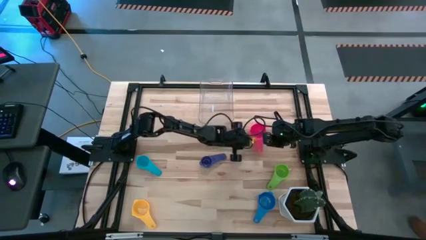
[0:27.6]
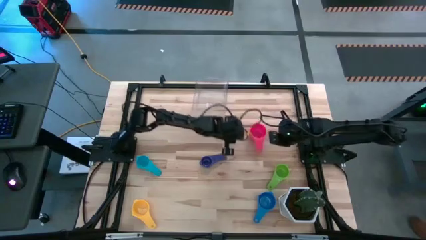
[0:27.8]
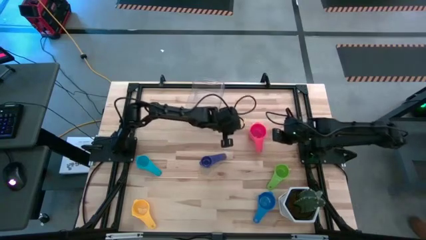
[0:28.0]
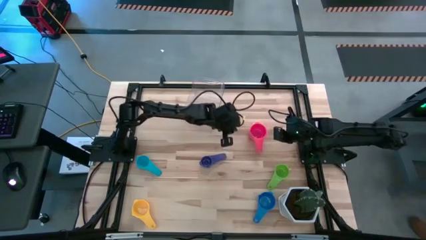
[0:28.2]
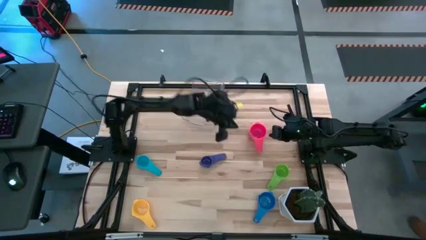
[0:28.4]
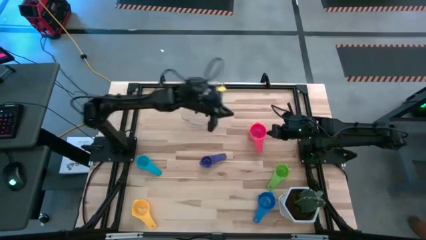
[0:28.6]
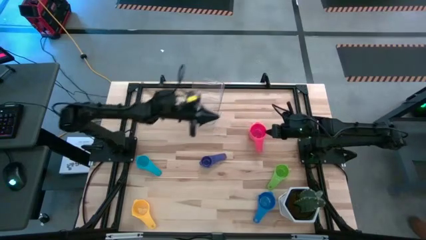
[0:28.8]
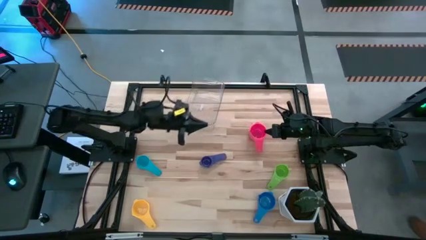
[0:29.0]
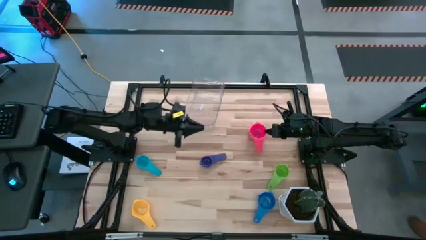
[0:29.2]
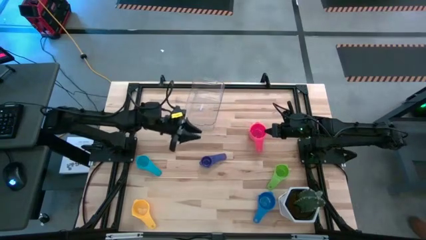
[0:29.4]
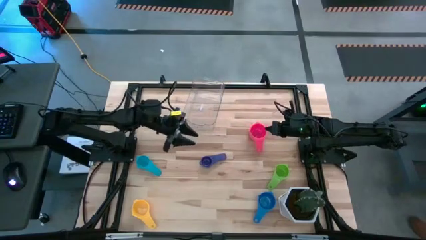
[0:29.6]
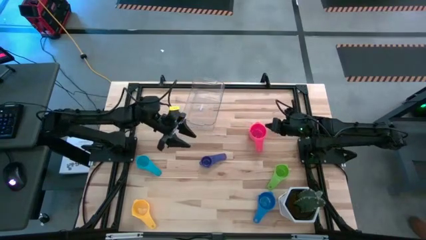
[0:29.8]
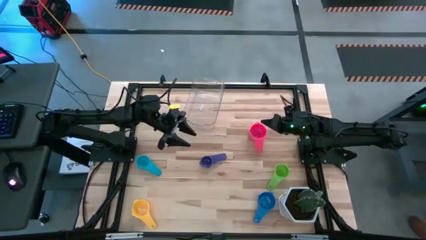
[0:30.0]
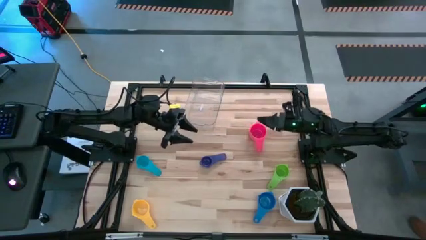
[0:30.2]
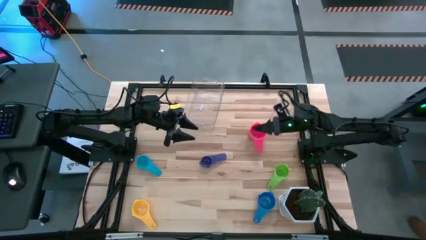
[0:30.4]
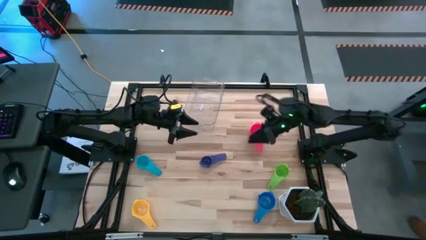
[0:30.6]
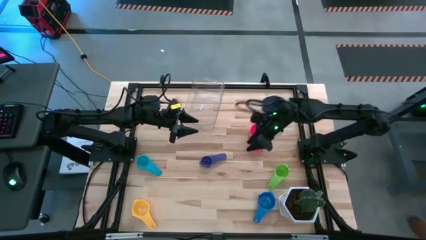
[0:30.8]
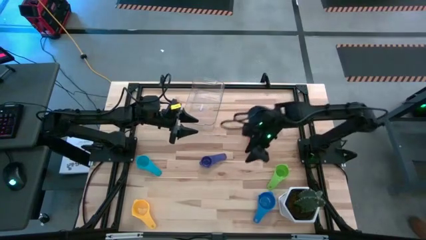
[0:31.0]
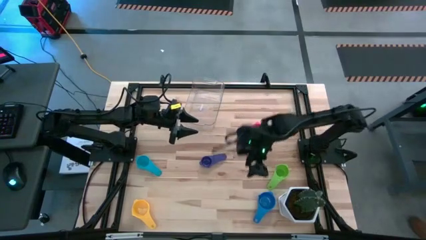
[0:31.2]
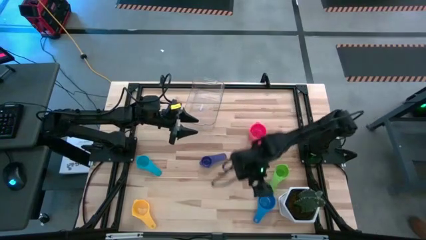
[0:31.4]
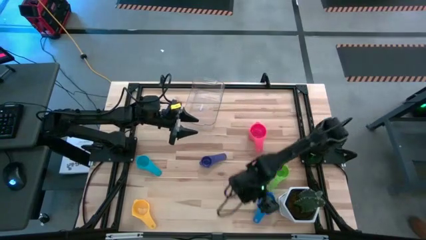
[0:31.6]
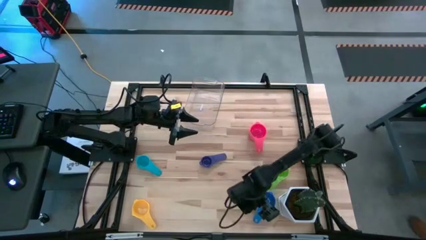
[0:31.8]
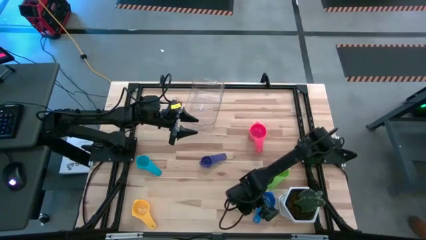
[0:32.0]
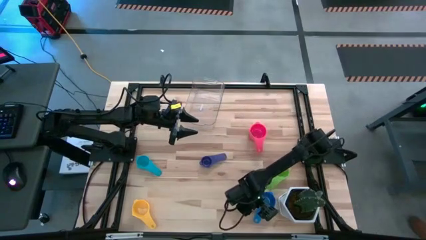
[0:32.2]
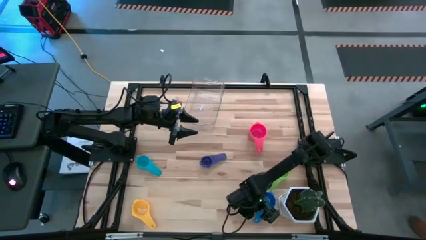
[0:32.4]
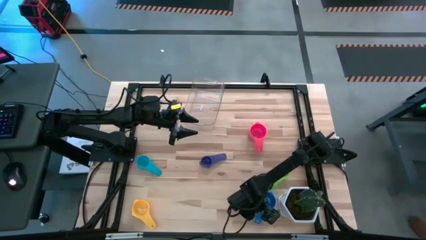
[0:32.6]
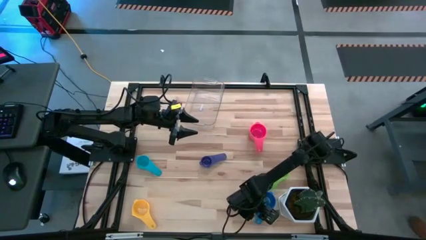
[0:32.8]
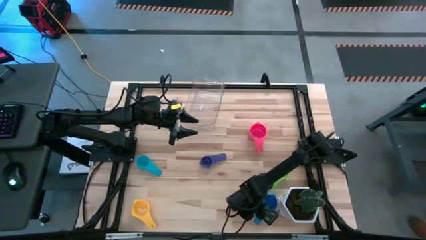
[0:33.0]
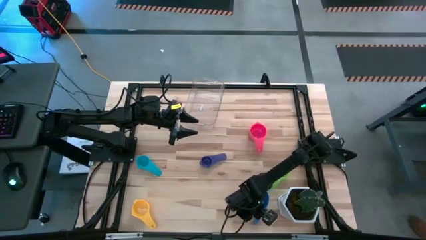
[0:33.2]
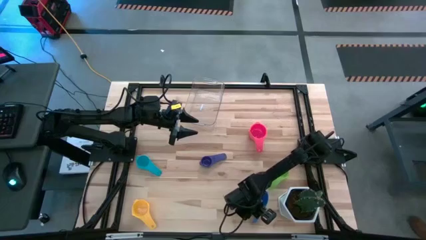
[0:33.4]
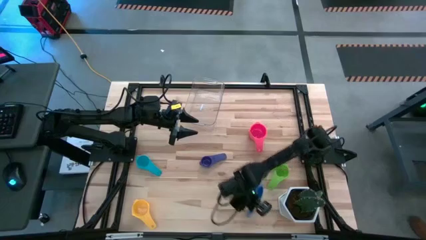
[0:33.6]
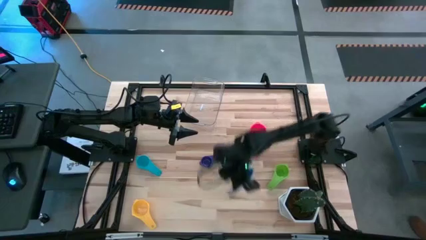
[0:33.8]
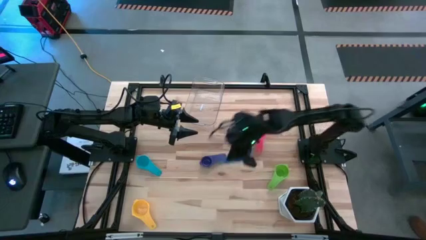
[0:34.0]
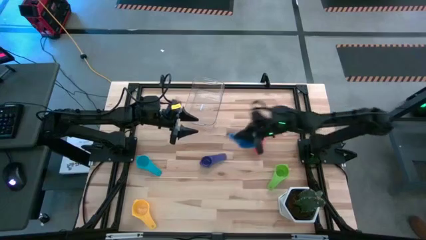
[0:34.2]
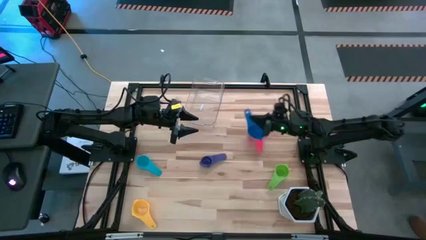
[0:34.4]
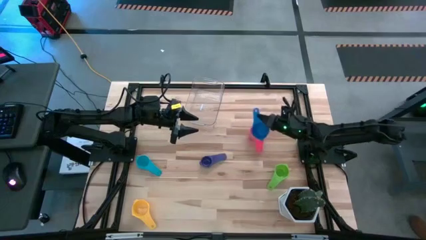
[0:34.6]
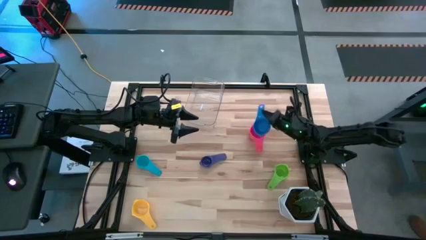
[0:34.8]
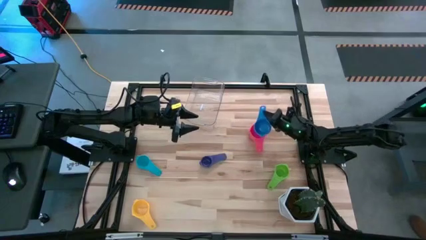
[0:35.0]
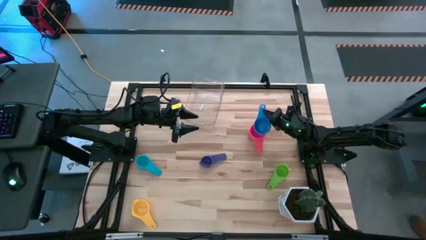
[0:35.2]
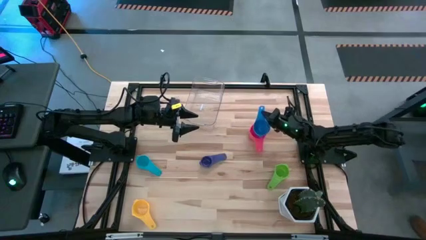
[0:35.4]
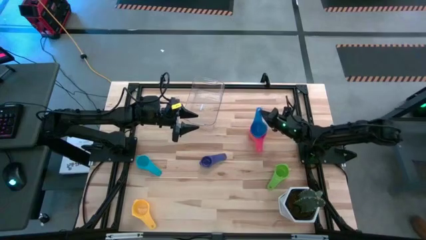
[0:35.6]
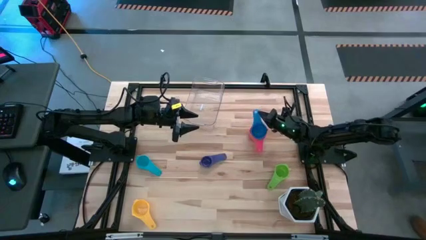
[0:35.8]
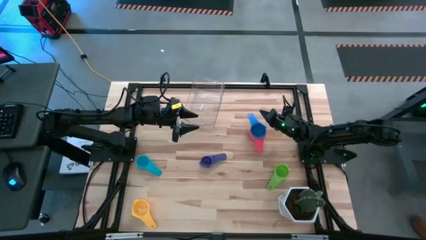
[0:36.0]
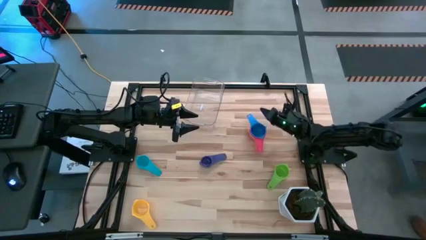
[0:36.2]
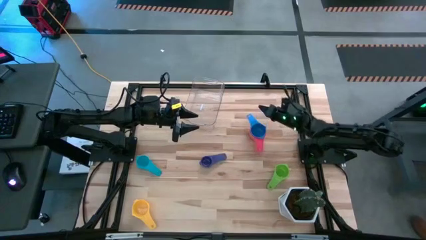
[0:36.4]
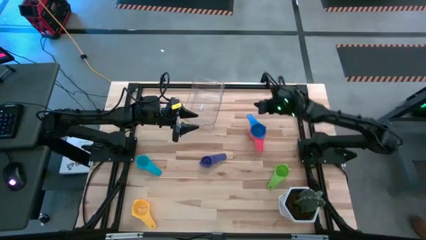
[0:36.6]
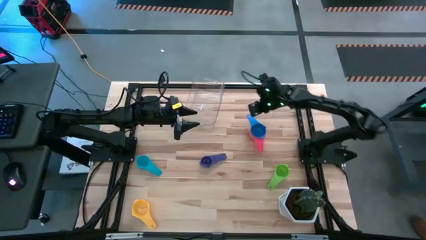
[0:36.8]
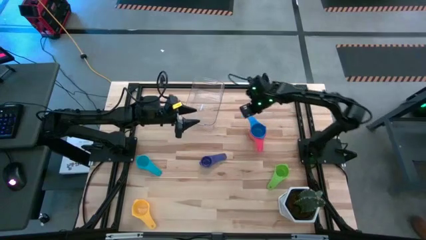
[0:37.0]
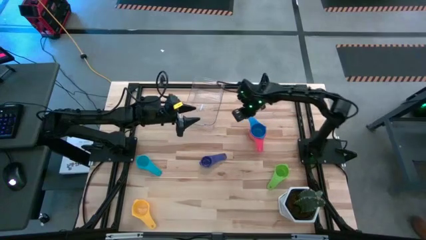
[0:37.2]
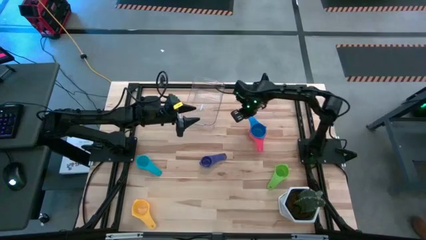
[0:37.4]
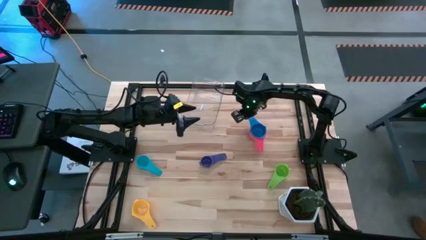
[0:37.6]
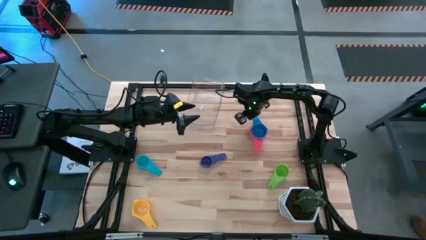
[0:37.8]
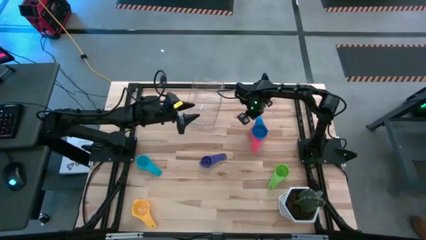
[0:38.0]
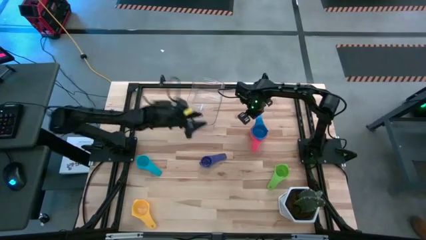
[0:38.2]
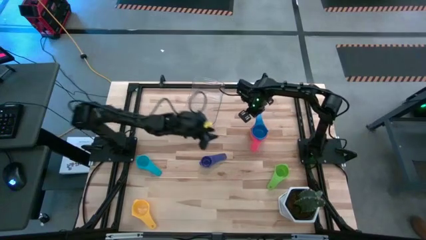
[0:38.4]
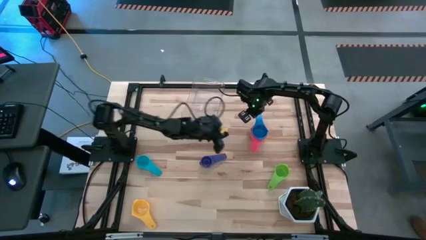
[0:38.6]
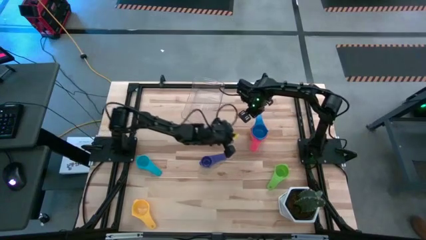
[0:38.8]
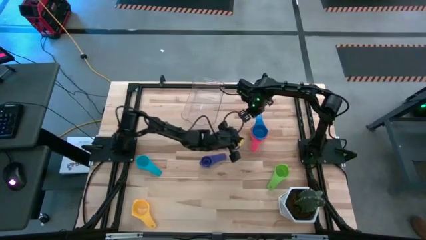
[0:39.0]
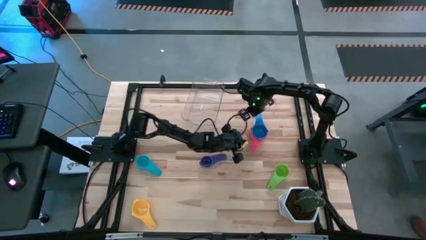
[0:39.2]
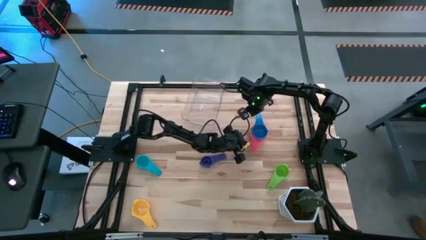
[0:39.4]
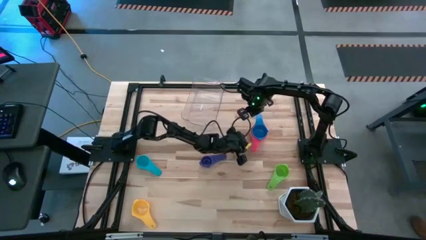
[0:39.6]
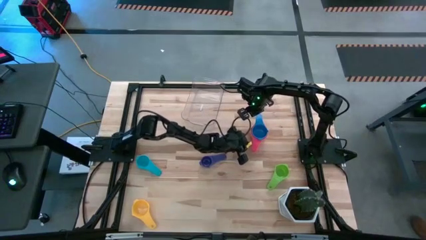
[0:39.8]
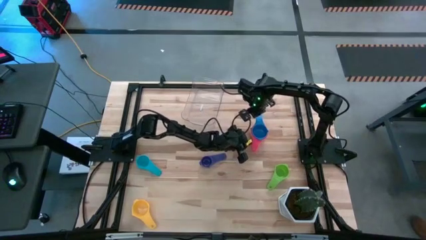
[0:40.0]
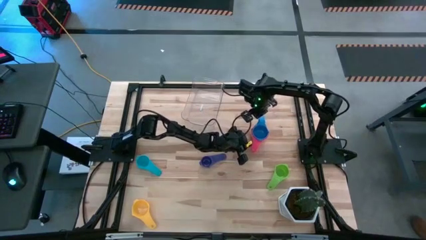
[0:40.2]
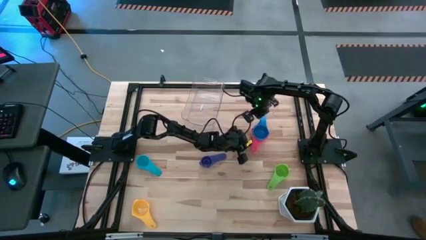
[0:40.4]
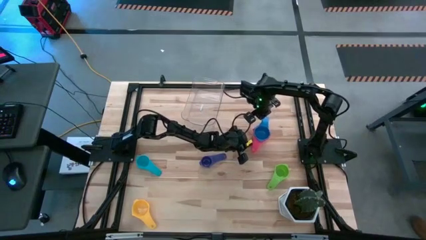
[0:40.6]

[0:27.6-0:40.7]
Task: Nest measuring cups in basket
Stack the blue measuring cup on top of the pink measuring cup
